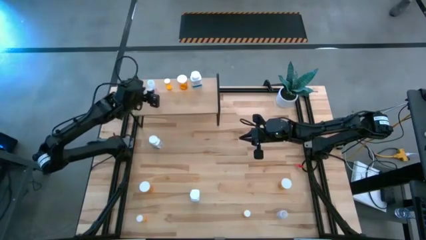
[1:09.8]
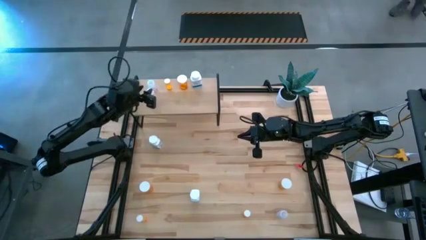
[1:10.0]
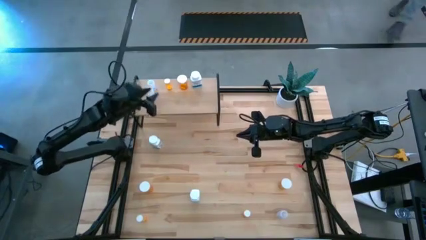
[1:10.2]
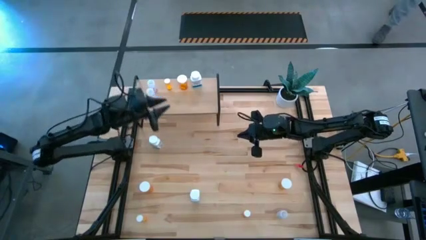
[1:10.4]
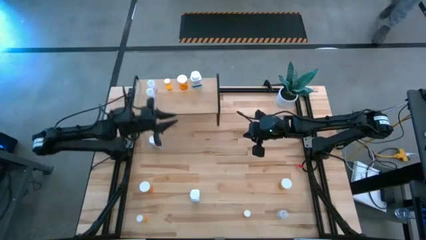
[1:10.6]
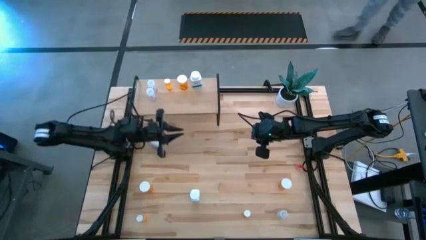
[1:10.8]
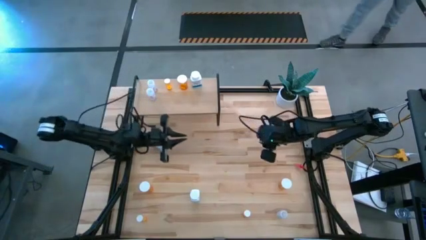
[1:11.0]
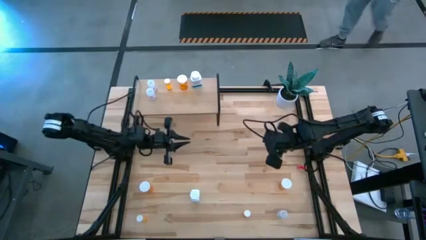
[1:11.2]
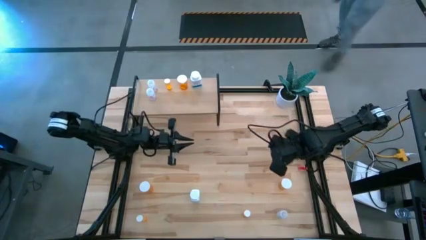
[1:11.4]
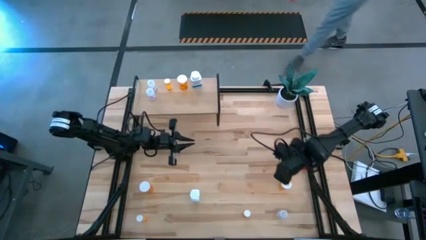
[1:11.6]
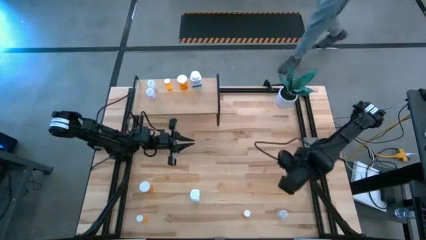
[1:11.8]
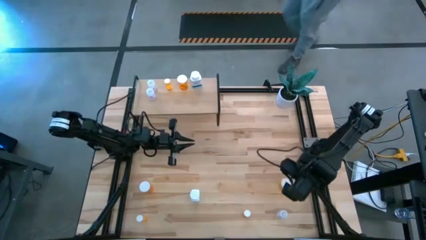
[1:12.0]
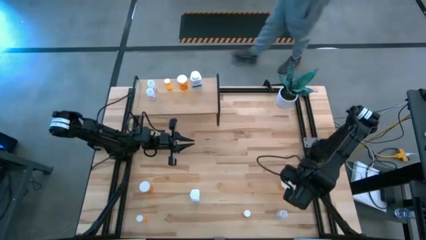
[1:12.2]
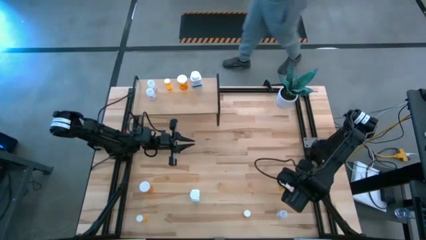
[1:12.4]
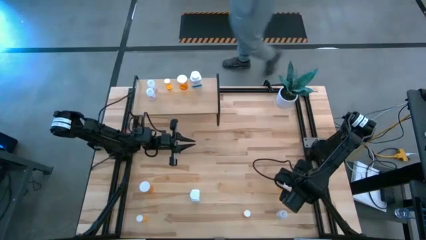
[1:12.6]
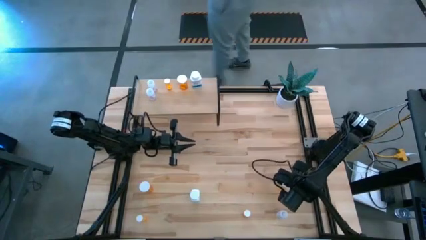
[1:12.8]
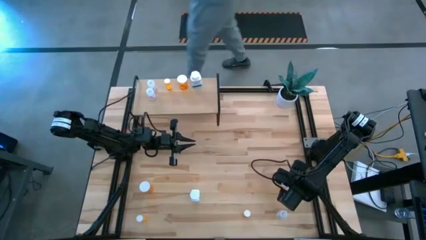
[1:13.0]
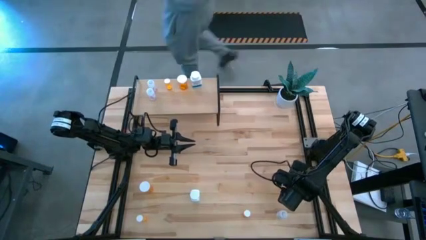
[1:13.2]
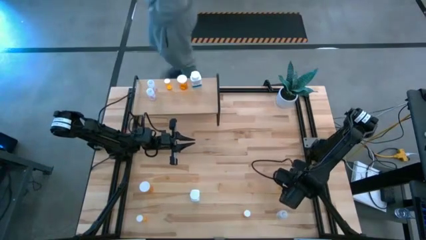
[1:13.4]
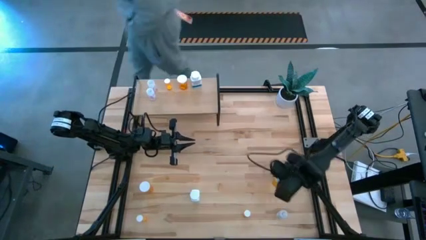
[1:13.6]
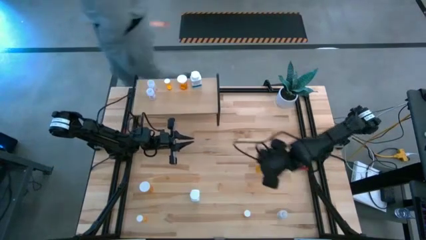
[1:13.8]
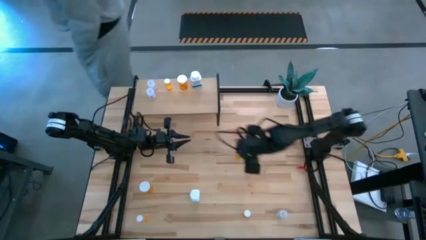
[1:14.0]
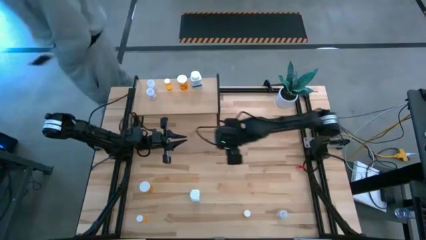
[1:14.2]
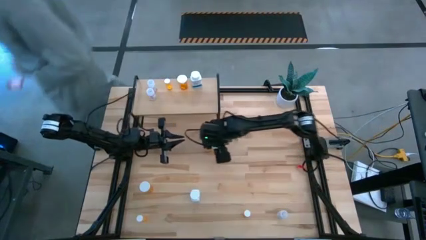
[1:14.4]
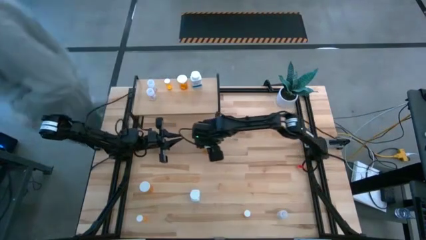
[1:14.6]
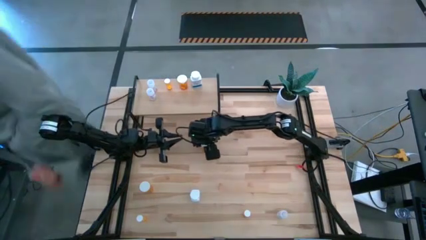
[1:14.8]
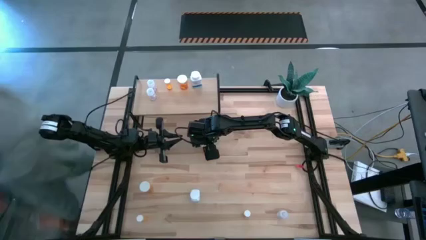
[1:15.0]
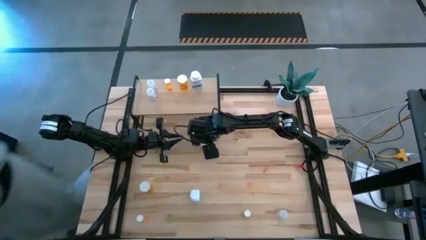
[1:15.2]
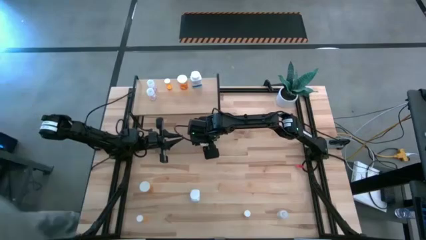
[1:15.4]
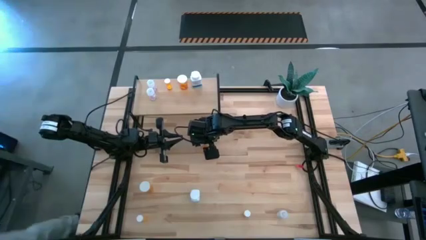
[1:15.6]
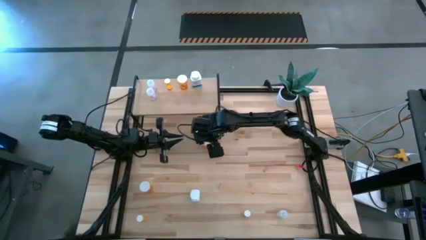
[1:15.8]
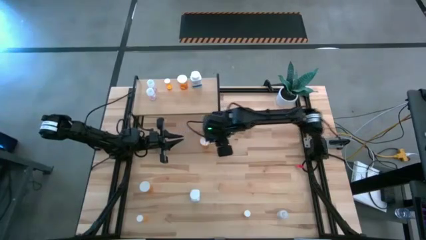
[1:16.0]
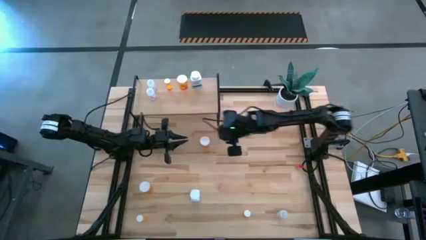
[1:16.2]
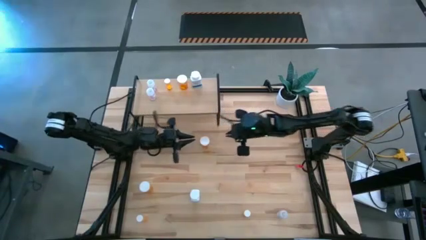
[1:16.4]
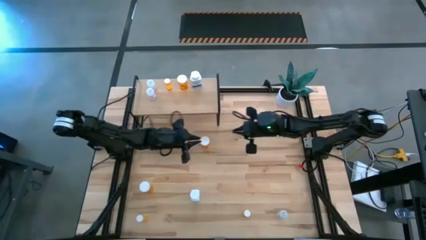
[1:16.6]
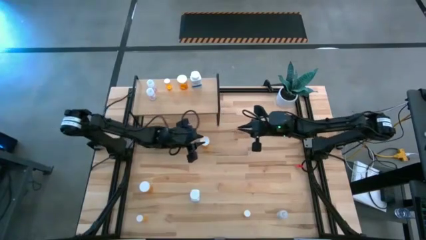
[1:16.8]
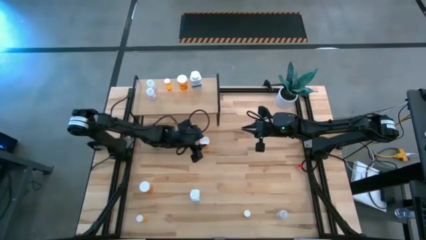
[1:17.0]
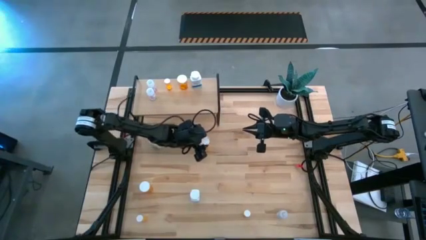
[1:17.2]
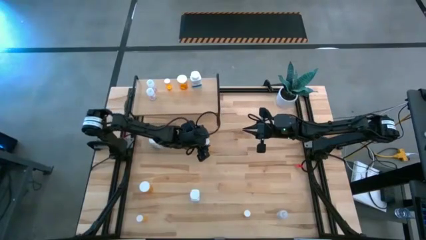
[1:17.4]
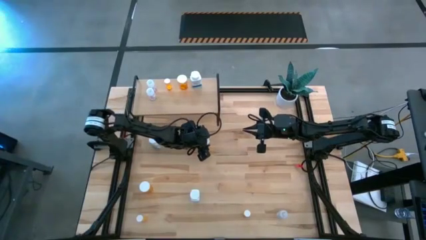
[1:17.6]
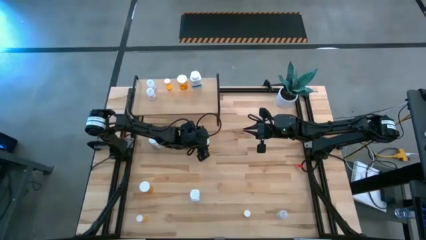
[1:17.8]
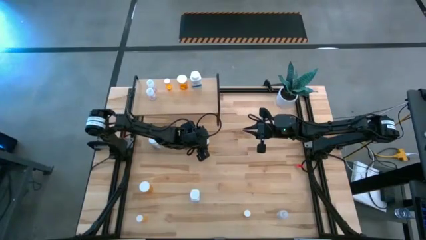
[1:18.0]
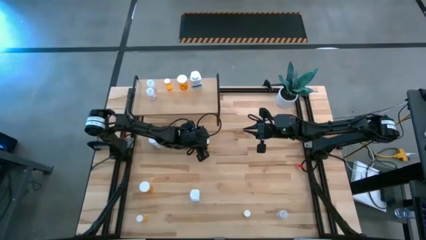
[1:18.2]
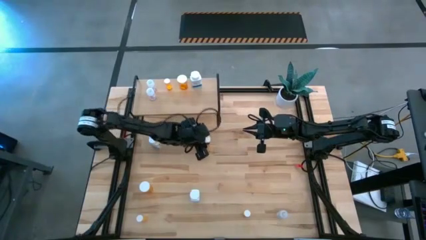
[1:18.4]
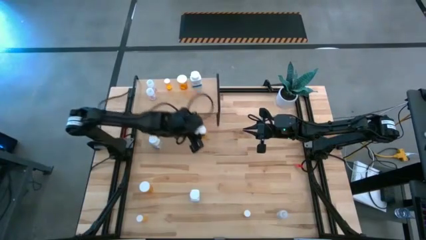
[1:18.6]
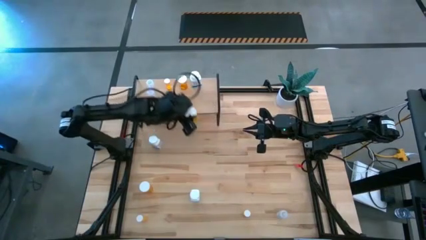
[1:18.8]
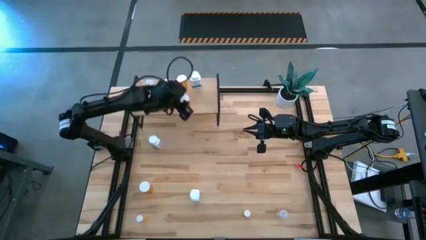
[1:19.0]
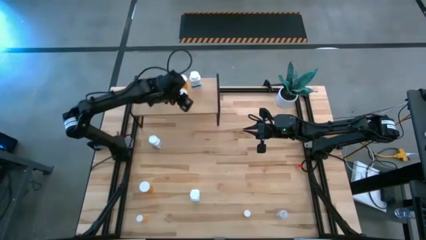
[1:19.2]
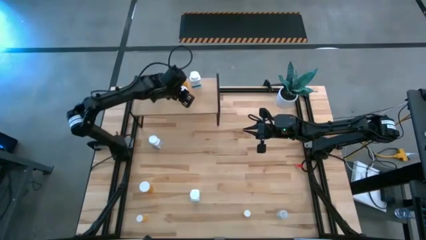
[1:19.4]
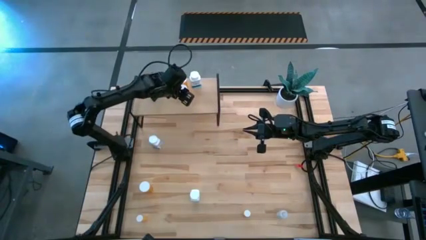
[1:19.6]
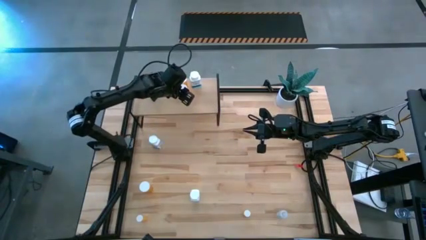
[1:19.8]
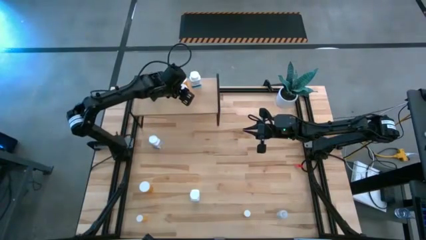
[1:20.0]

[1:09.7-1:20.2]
Task: Pick and place medicine bottles onto shelf by color
Put the right large orange pill bottle on the shelf aligned with the other large orange pill bottle

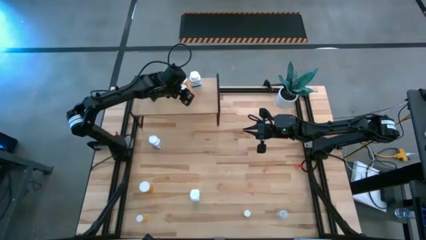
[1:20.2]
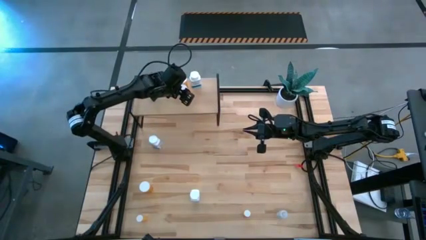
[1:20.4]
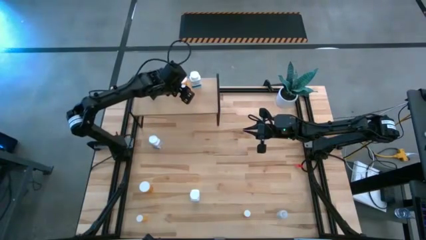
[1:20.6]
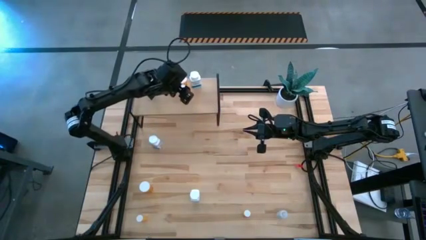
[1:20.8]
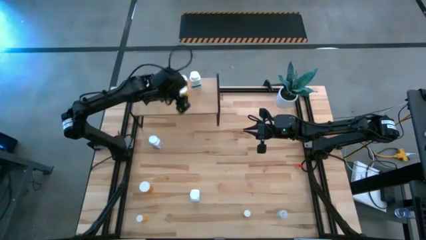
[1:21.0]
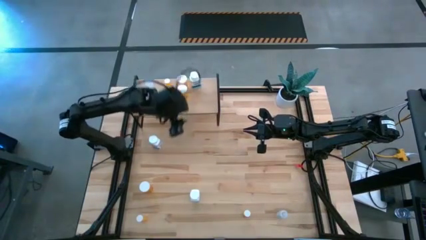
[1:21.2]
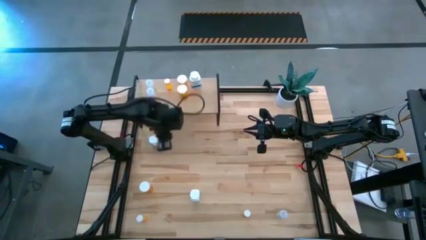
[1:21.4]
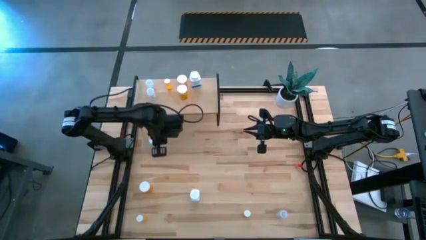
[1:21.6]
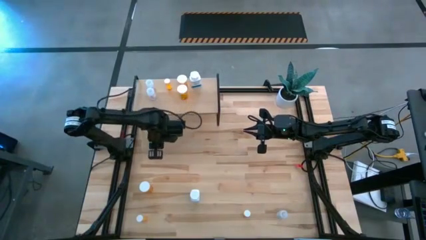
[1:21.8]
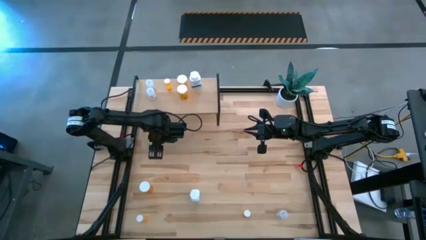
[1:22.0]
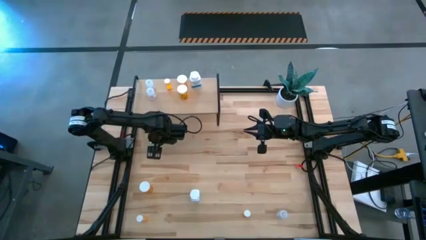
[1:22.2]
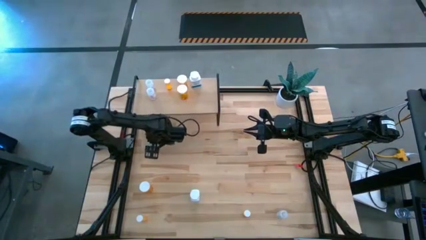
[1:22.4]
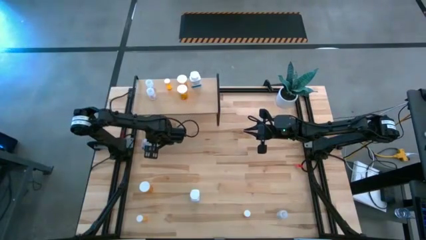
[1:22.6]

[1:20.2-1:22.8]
Put the top white pill bottle aligned with the other white pill bottle on the shelf
